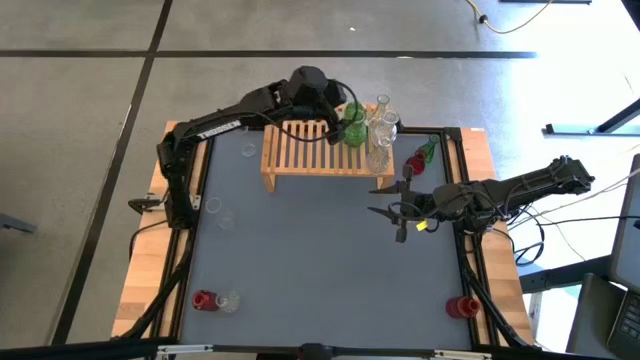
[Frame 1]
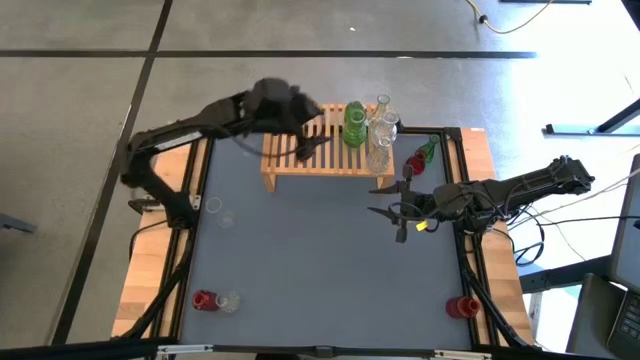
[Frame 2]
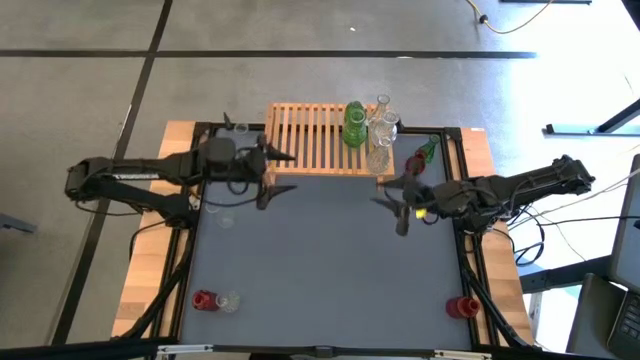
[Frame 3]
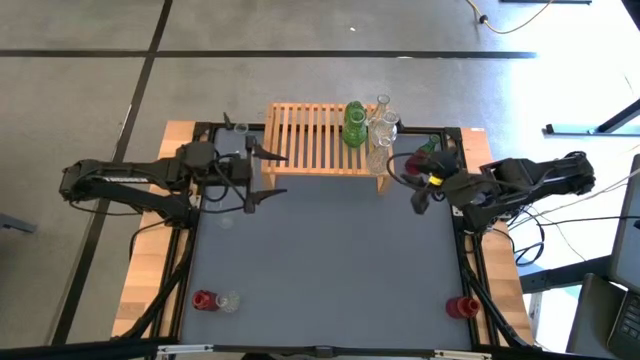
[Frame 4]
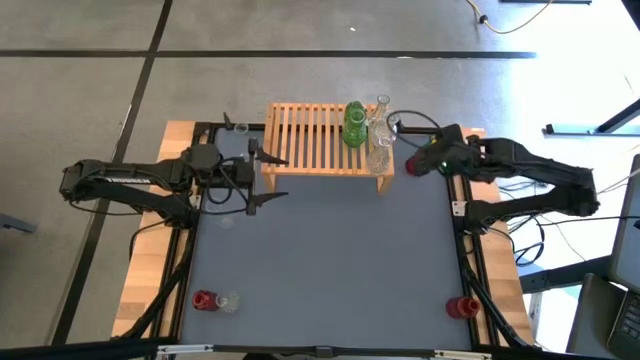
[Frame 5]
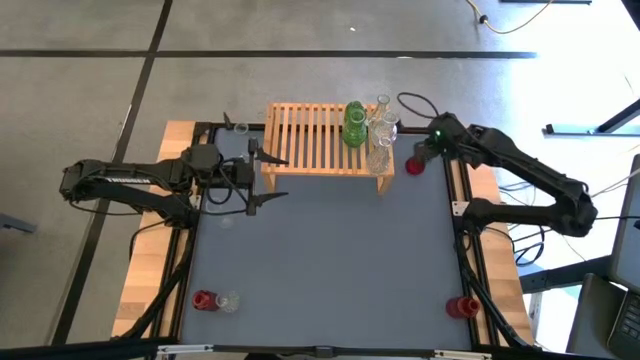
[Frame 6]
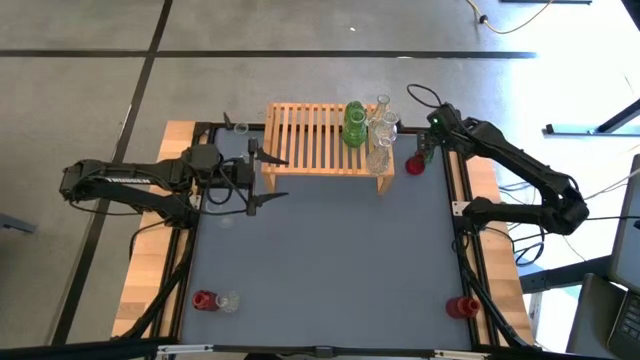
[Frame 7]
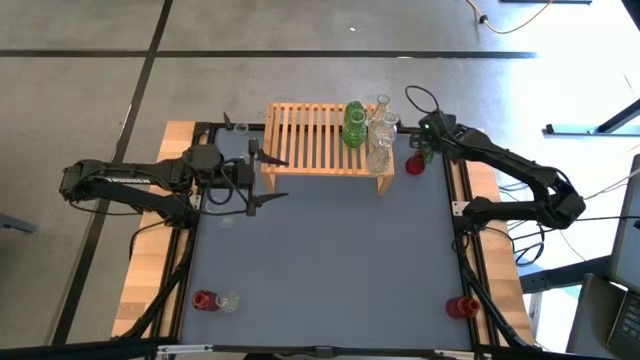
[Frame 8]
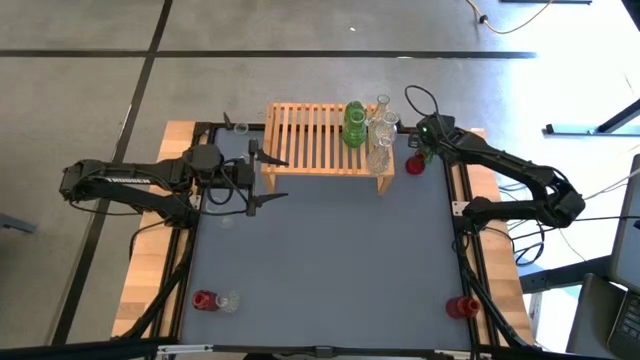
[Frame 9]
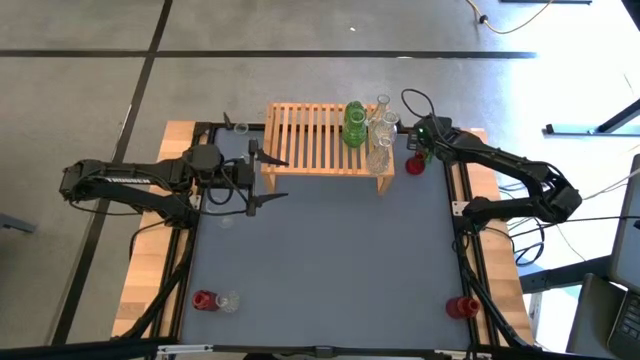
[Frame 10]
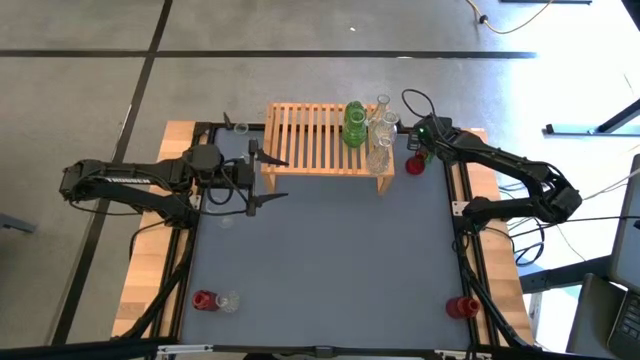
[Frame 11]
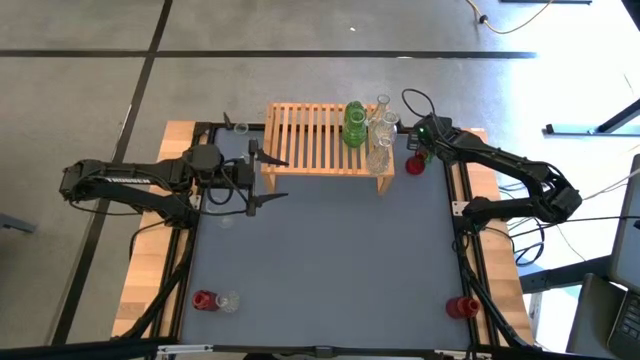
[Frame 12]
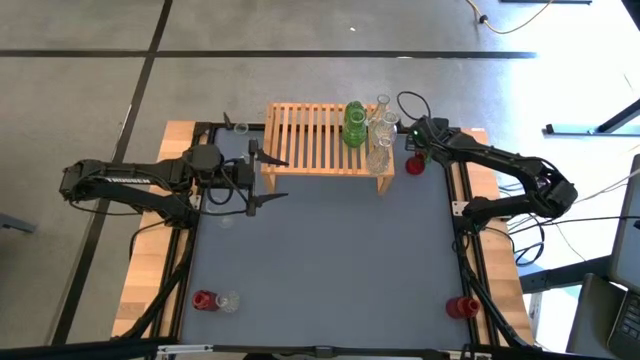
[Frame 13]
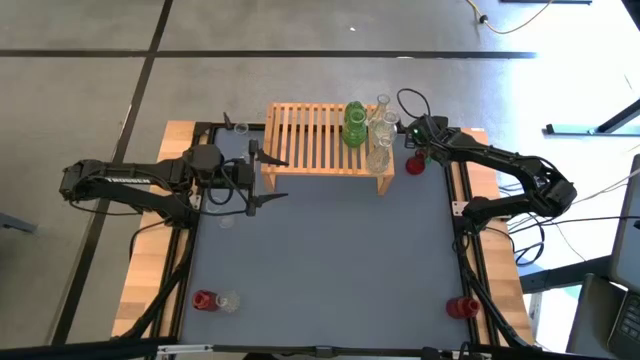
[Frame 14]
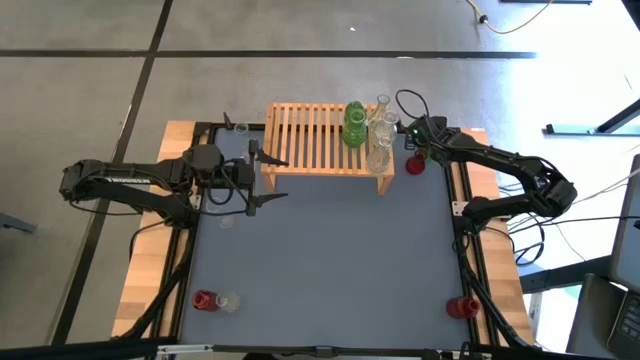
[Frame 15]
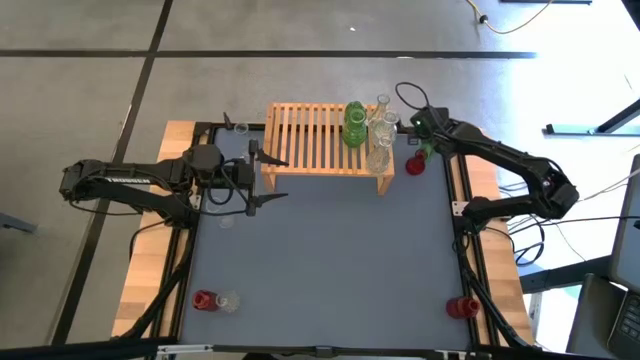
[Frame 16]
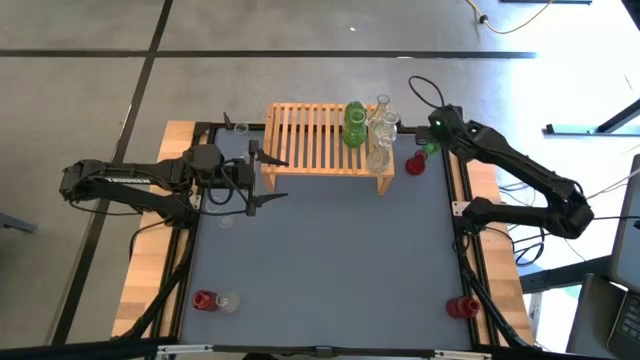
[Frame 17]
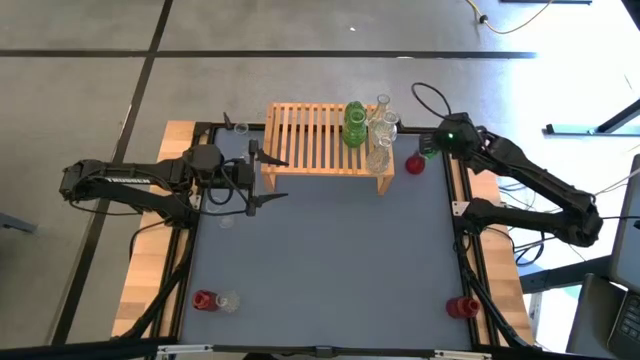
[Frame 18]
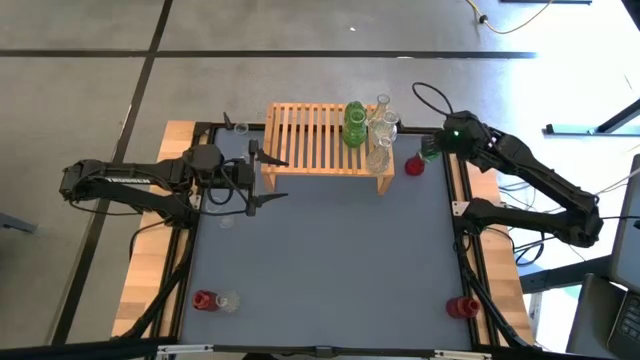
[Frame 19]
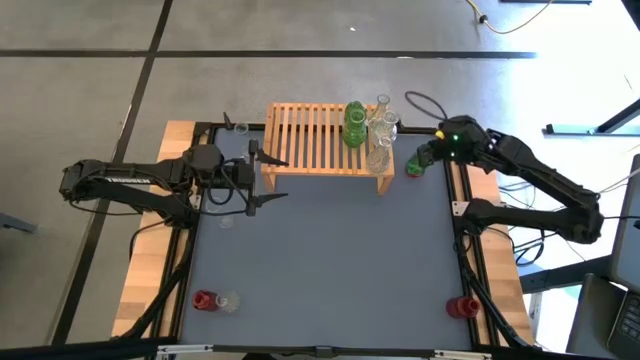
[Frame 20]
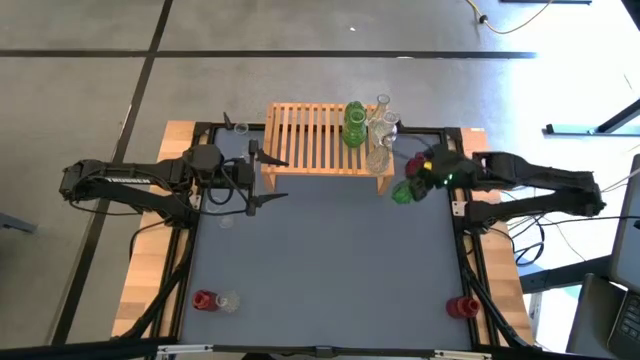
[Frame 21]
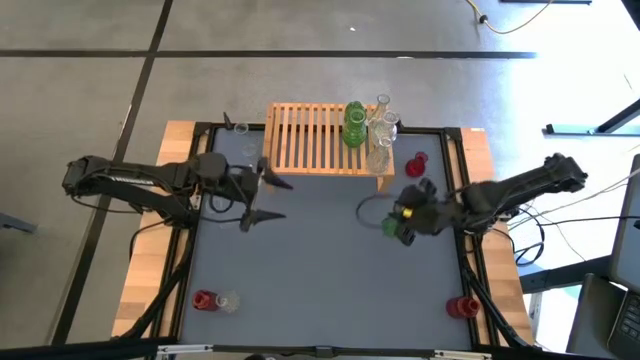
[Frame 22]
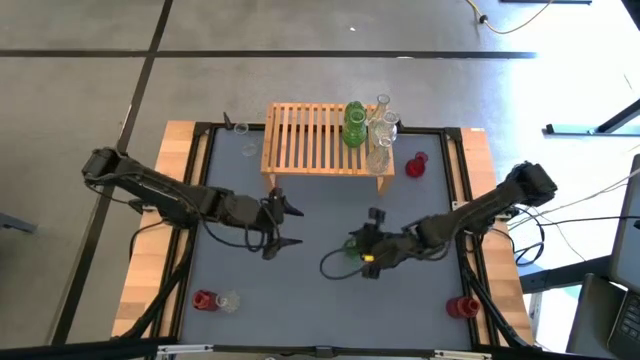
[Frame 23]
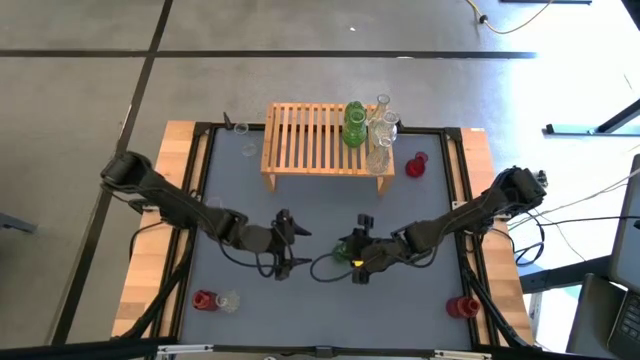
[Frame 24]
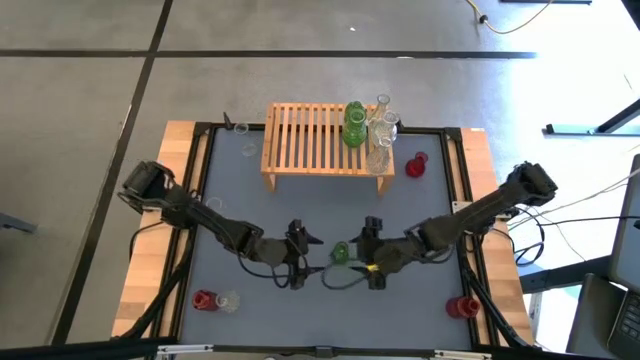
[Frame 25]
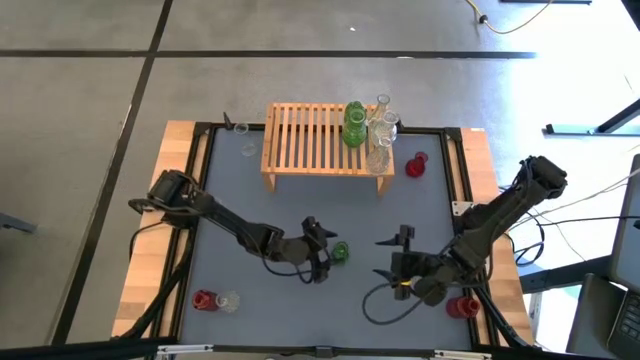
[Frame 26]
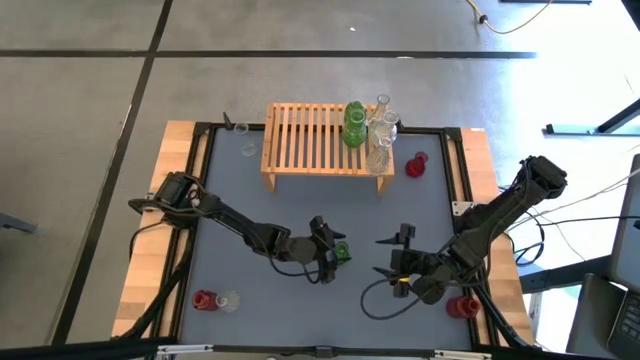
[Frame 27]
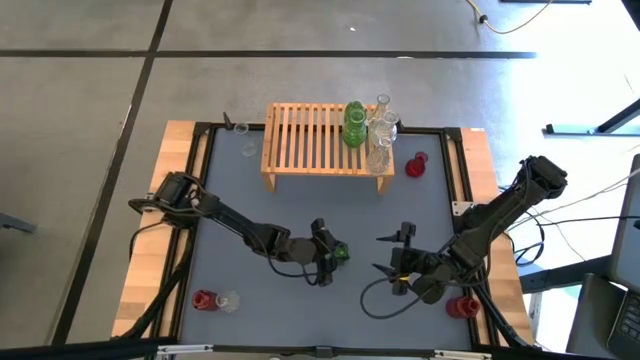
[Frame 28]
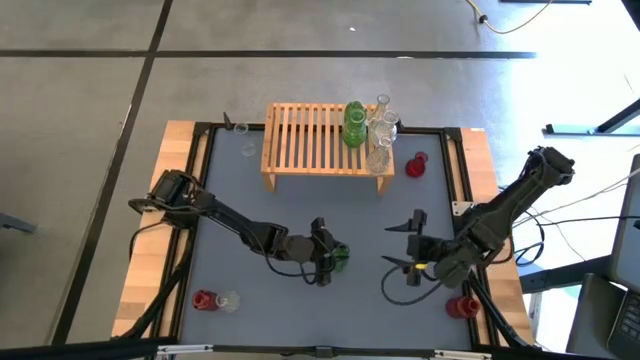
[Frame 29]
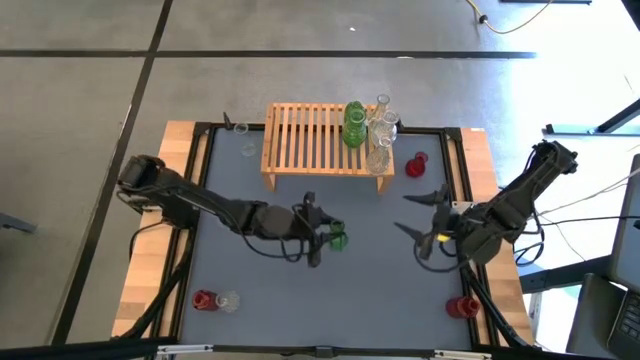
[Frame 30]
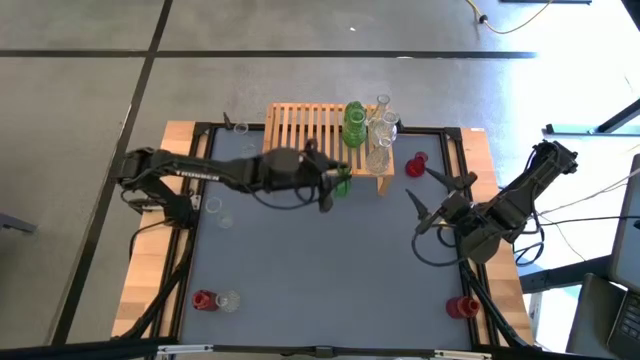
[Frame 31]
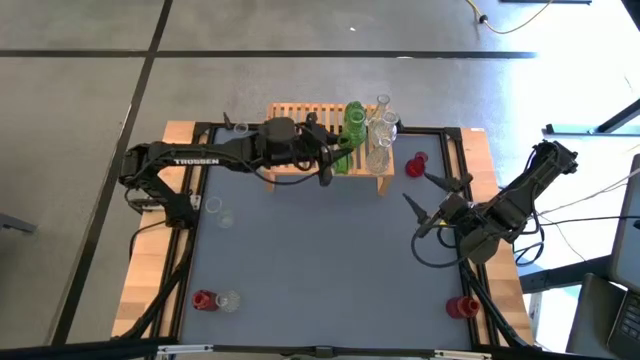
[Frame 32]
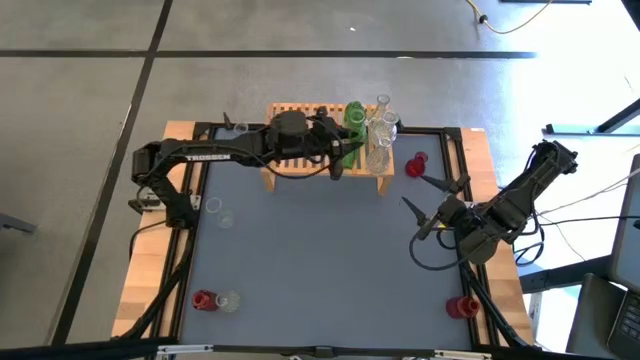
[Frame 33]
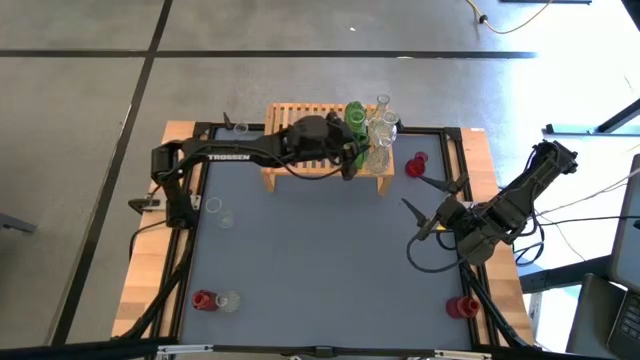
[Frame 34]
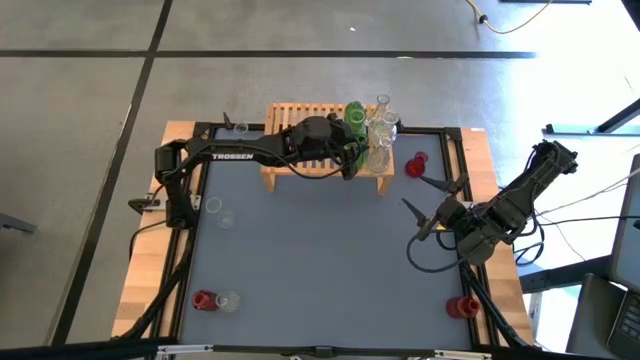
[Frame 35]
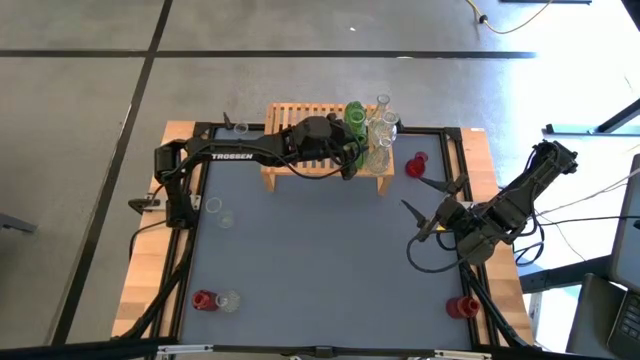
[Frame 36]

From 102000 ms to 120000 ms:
Task: sort vases onto shelf
Put the green vase on the shelf aligned with the other green vase

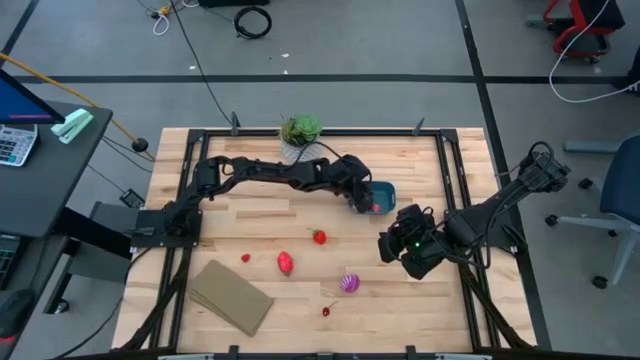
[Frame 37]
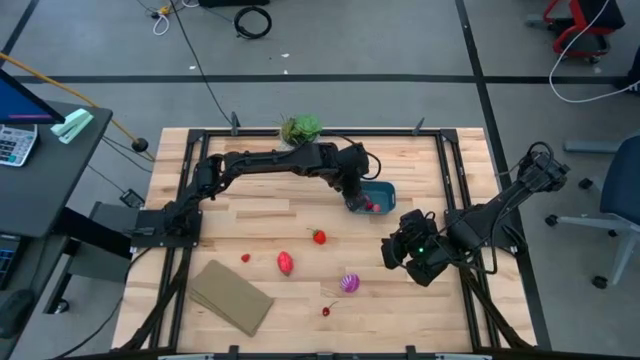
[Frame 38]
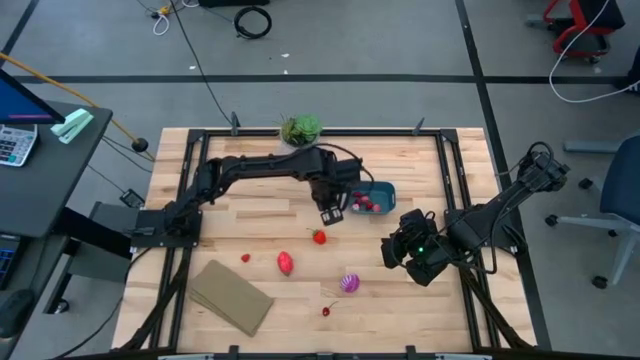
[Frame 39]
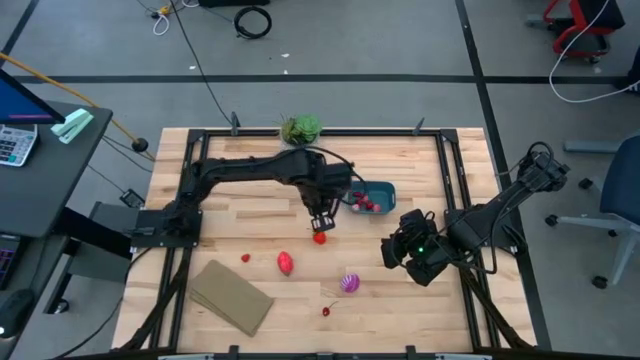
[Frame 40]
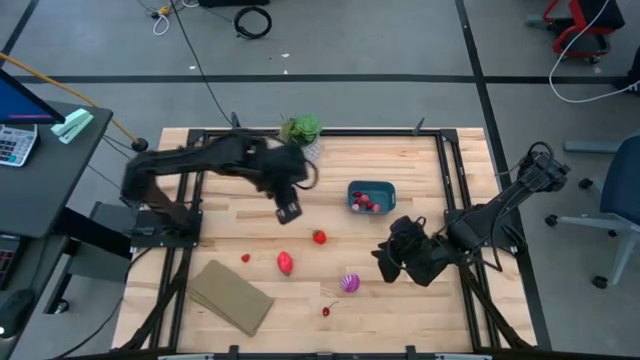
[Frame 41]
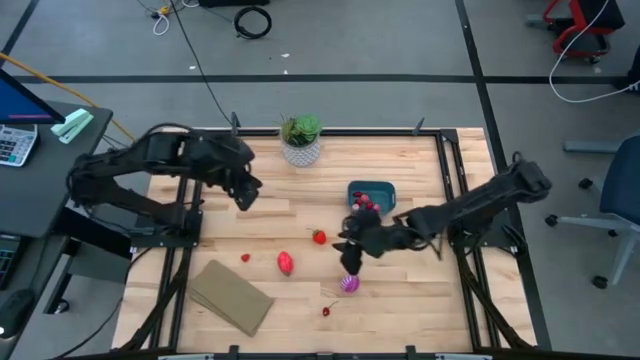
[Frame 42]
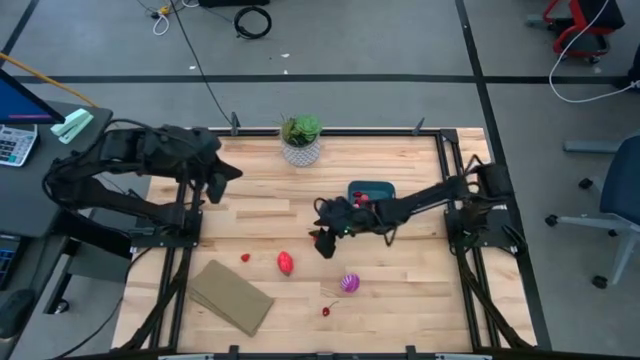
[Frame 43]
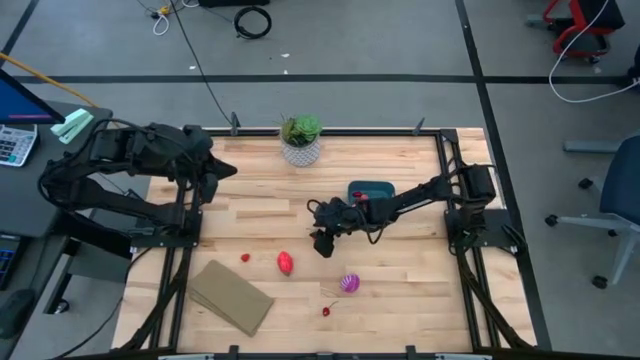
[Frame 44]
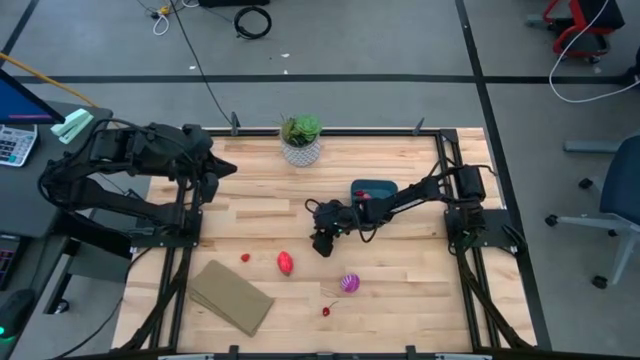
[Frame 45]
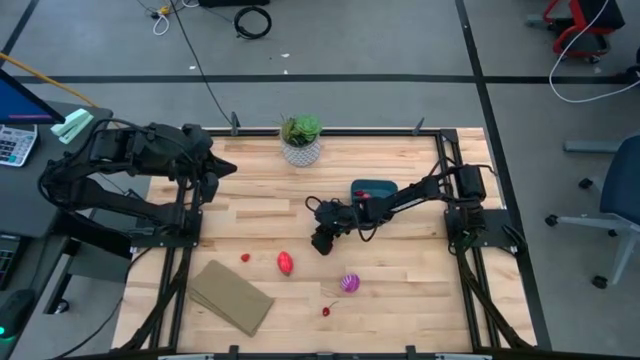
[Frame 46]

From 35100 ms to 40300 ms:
Task: Pick and placing Produce into tupperware
Put the red strawberry into the blue bin
